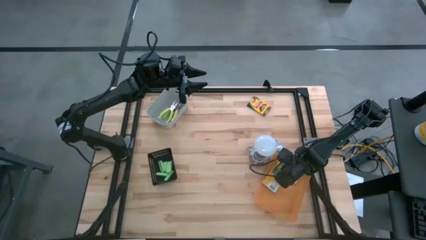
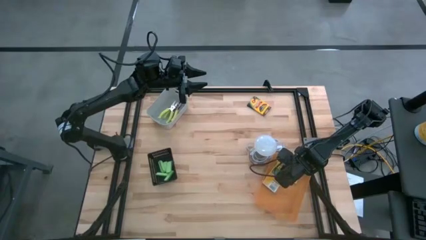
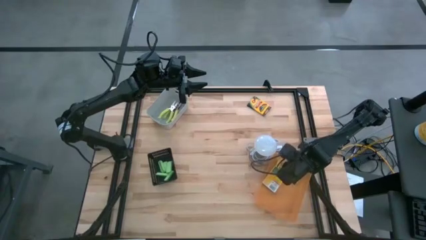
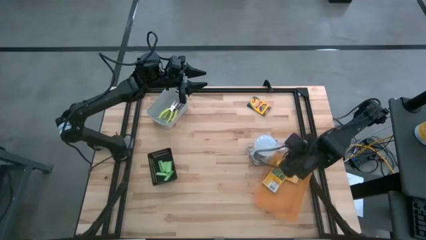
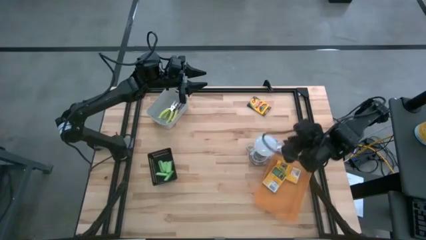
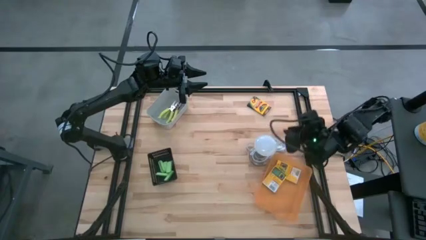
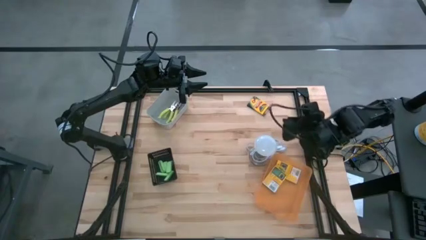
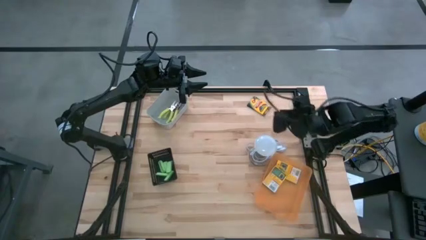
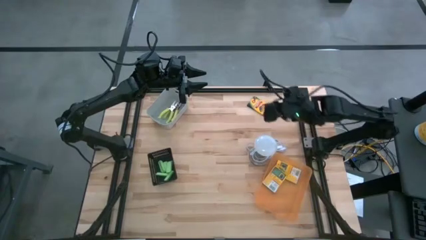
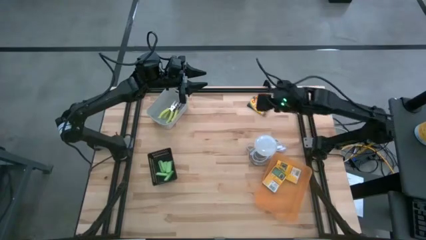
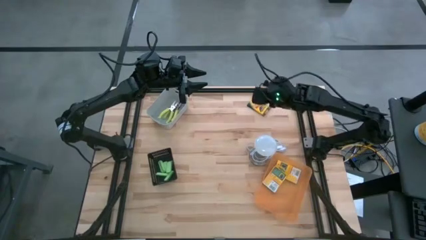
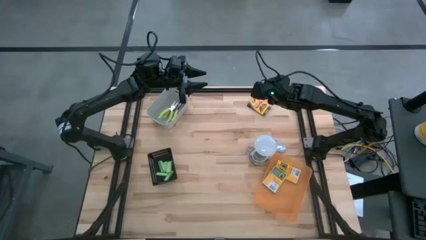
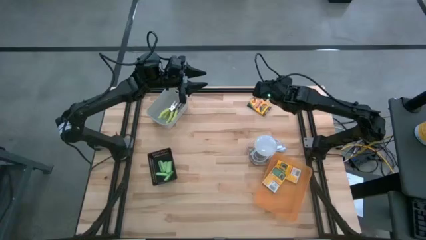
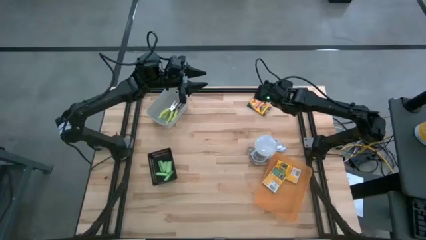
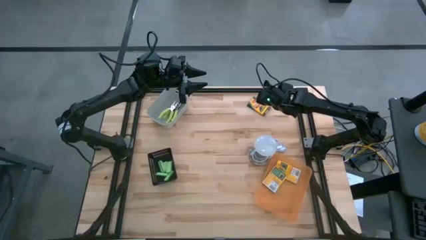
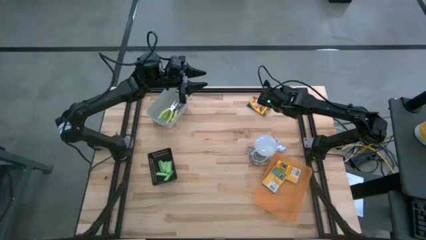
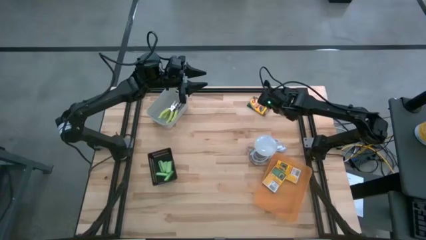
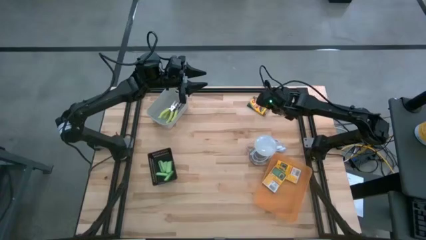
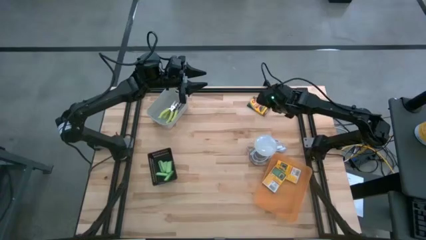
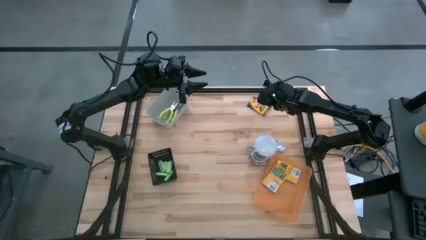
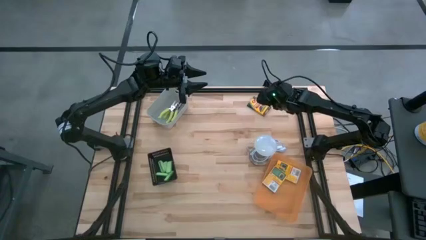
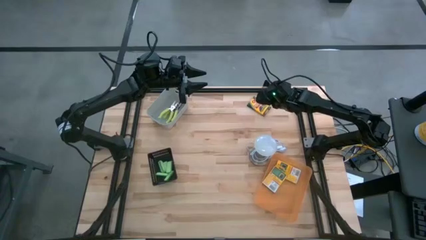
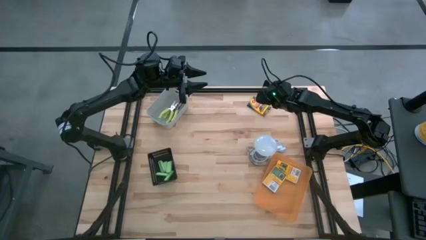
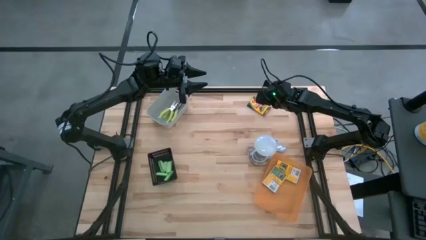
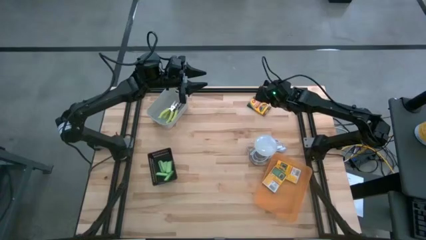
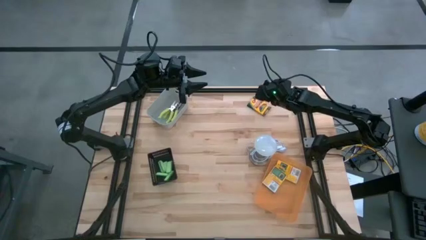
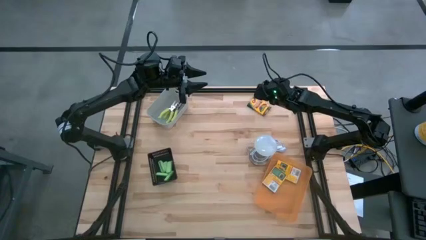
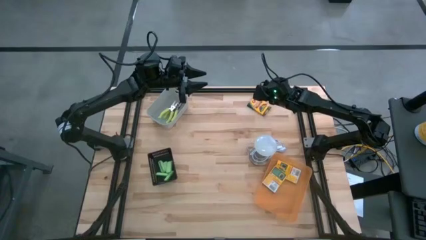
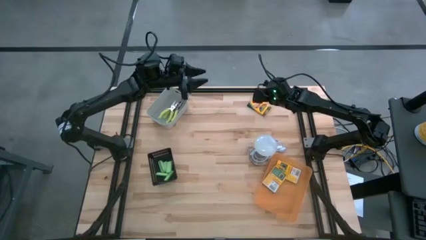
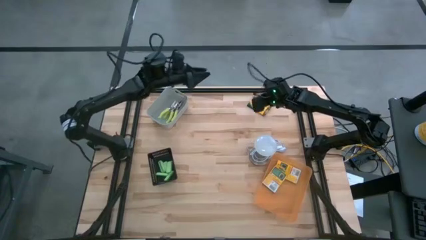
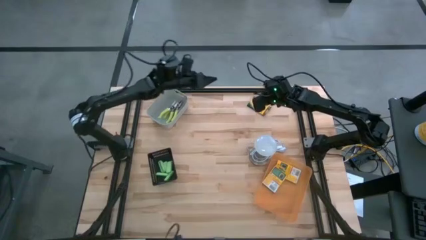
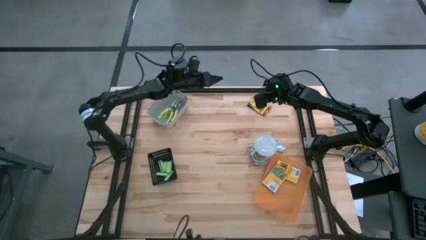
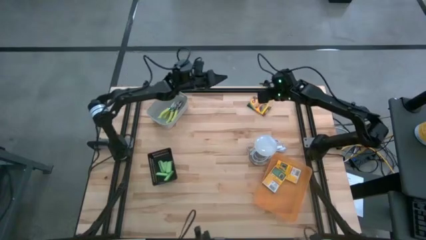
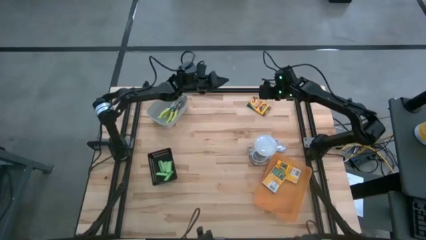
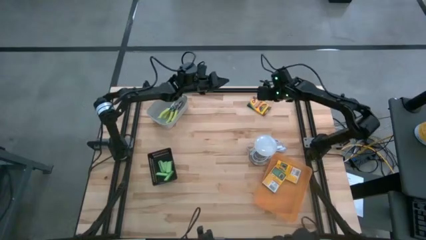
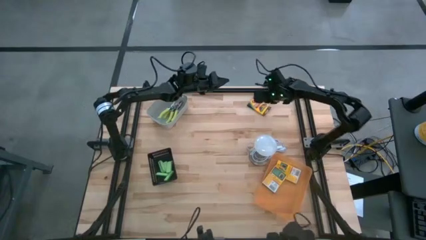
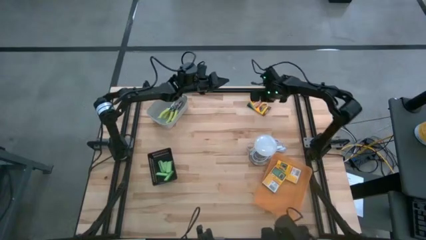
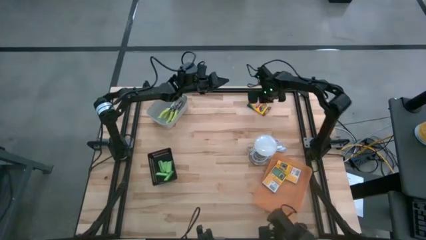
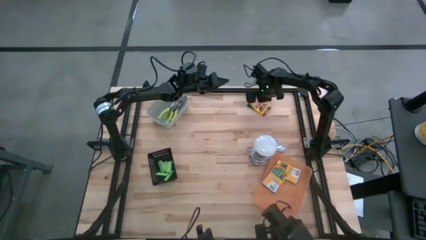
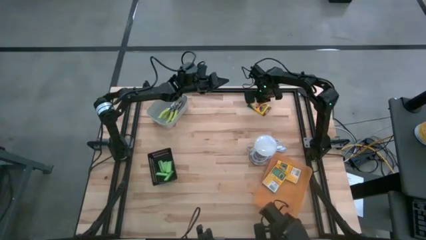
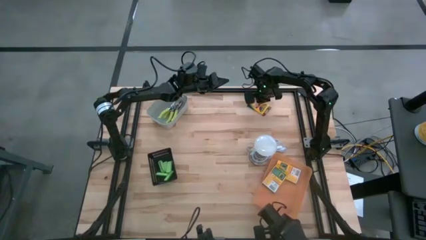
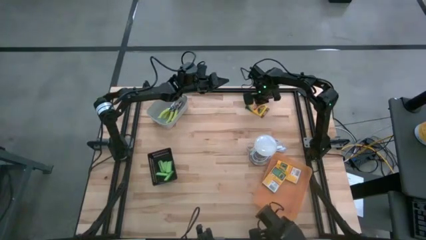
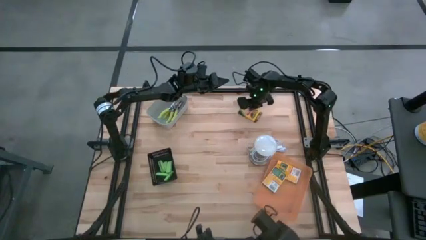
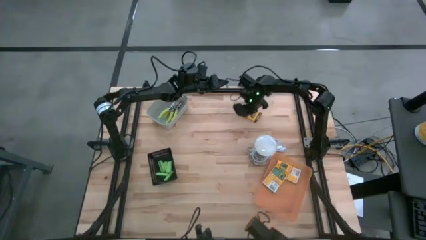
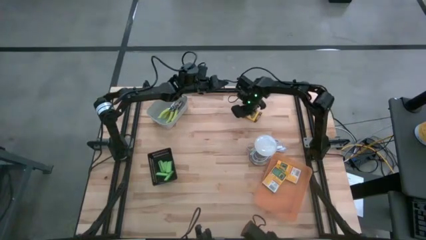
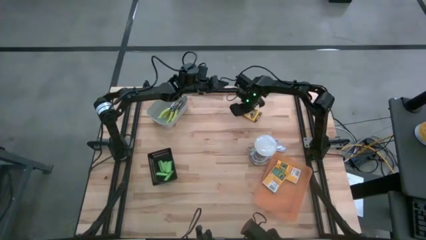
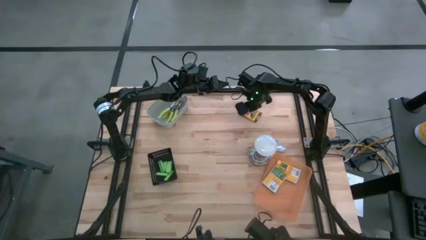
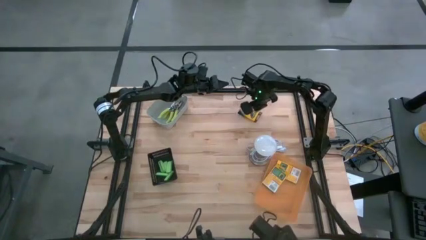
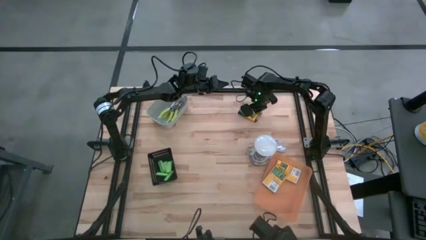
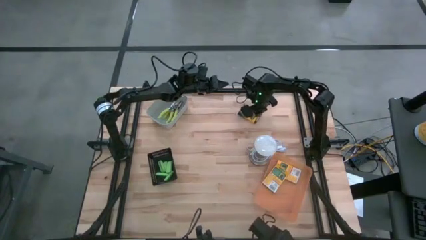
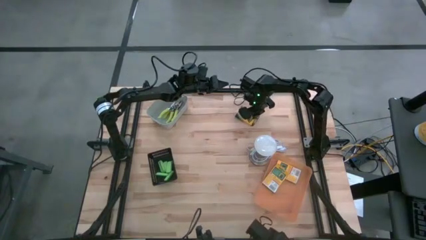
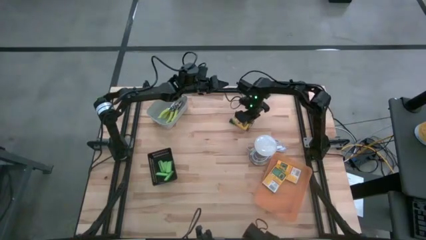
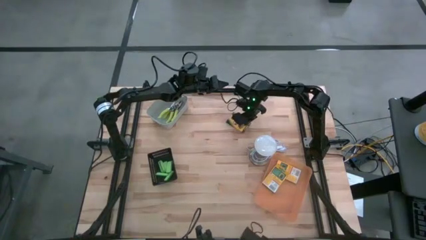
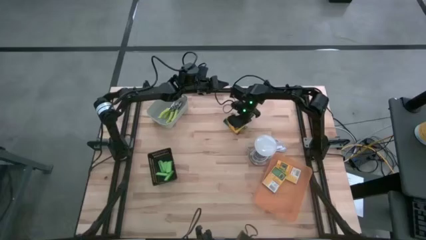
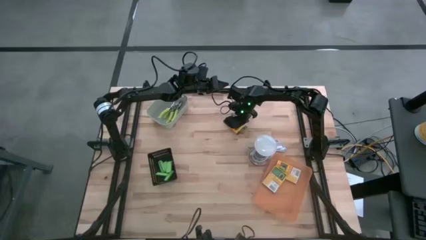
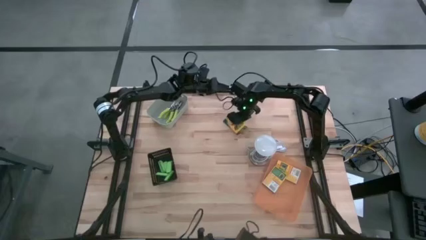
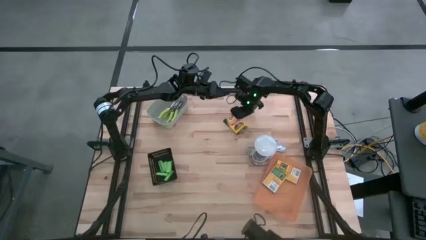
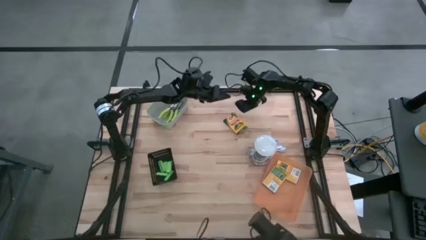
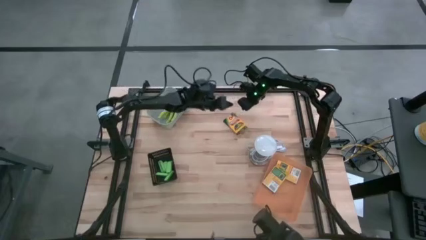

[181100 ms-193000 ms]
Task: Pick & Place School Supplies
Put the yellow yellow crayon box into the orange bin

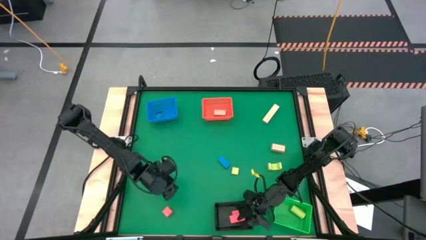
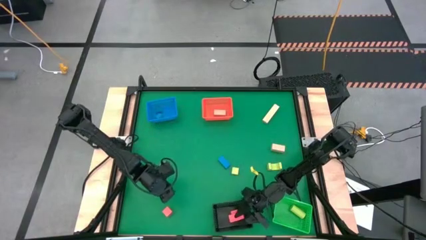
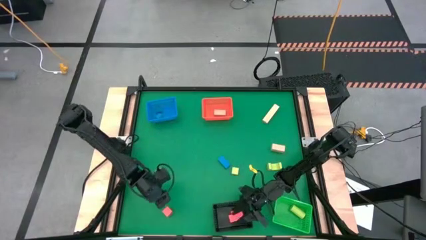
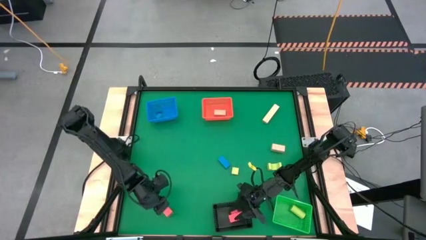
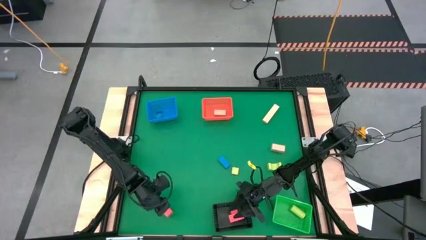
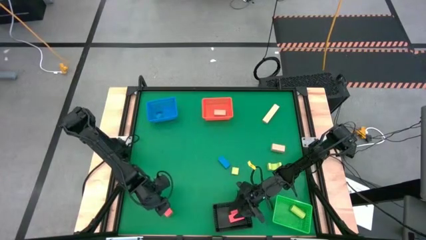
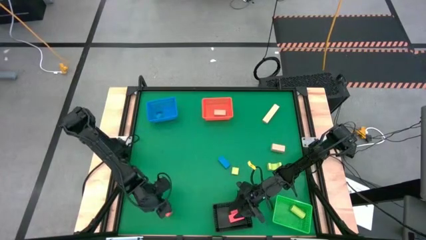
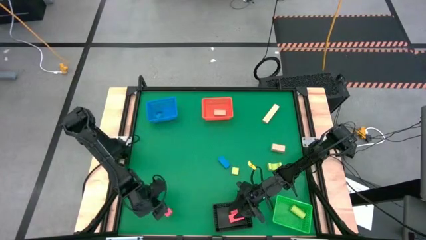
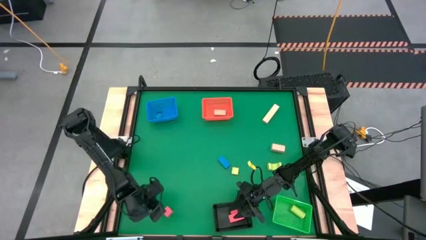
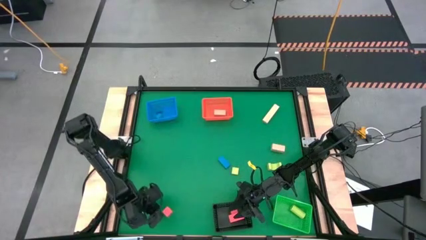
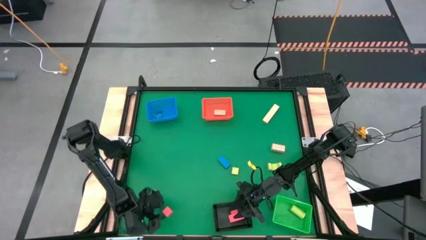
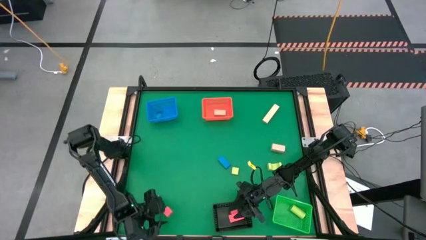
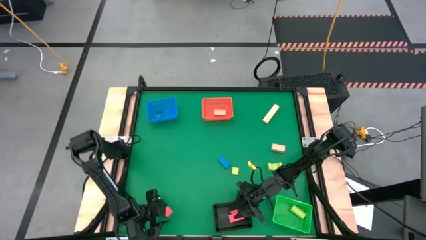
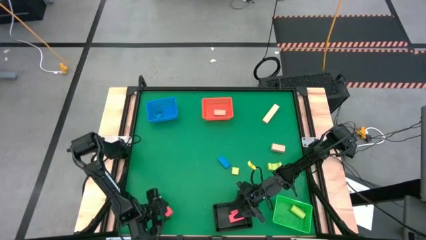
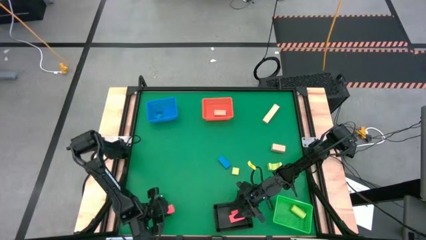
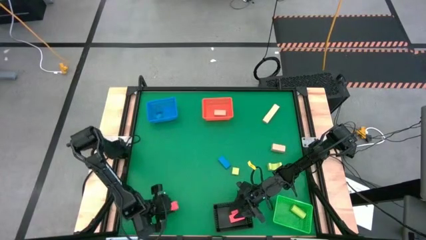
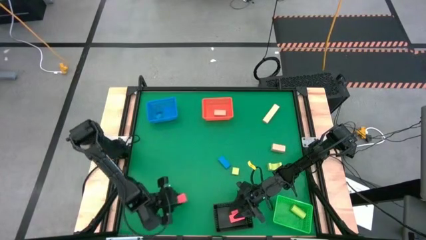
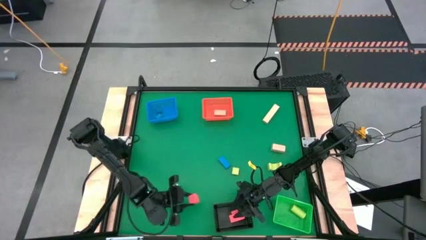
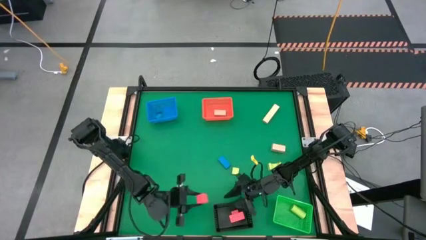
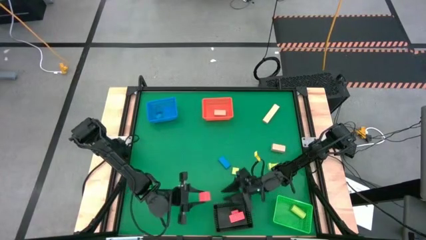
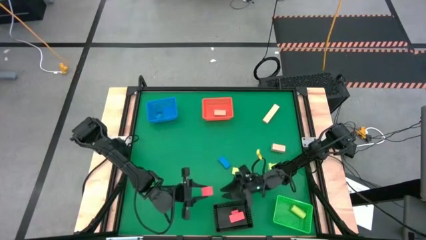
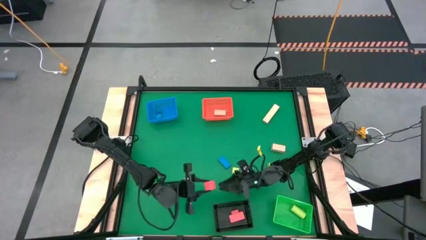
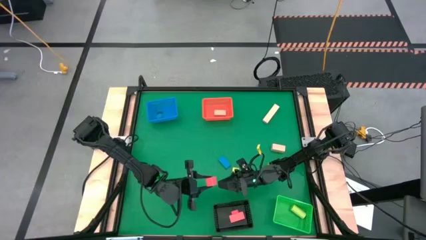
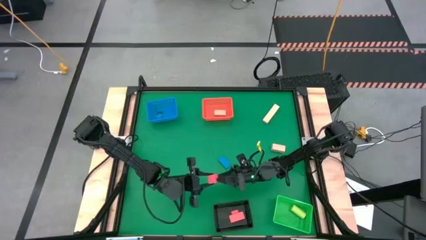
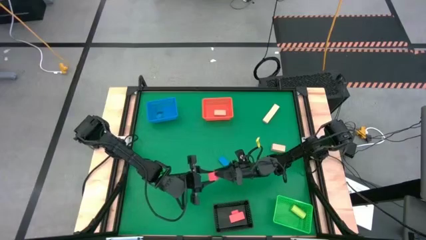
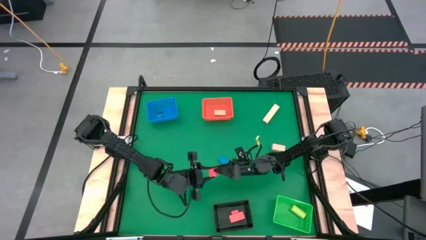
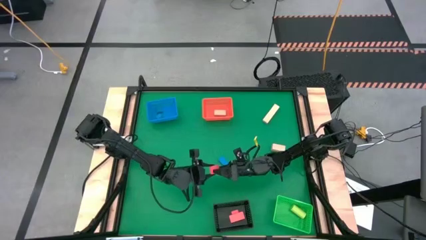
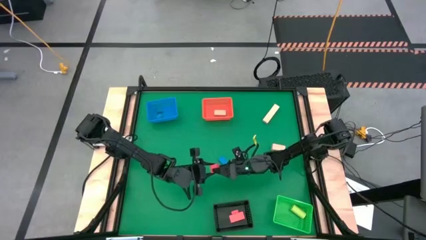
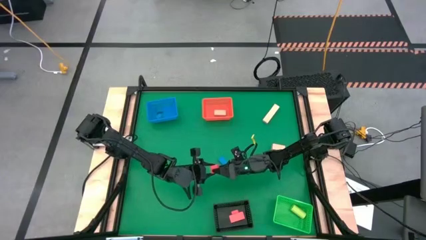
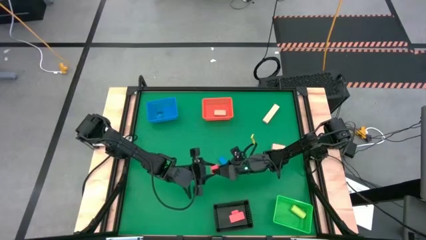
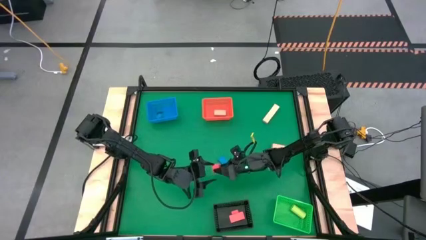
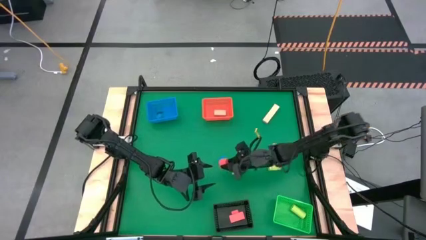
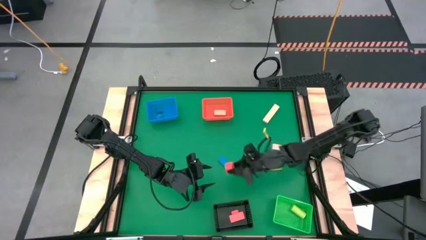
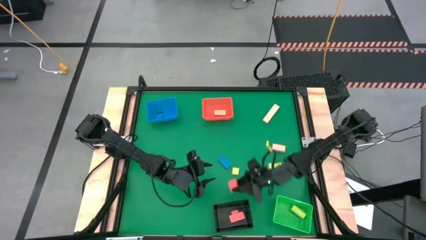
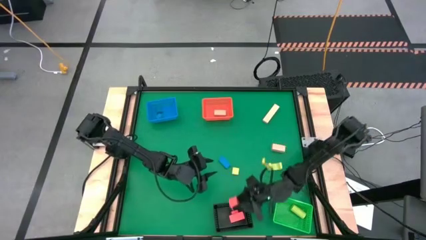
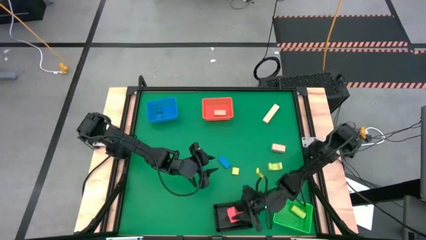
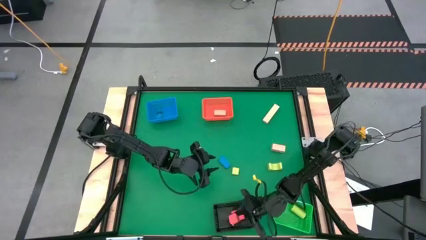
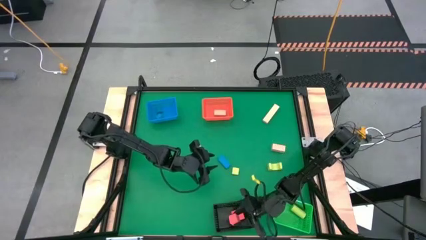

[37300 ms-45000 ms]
Task: Sort & place blocks by color
Put the red block into the black bin
